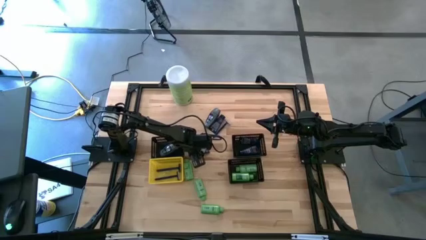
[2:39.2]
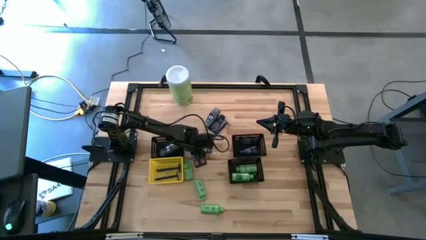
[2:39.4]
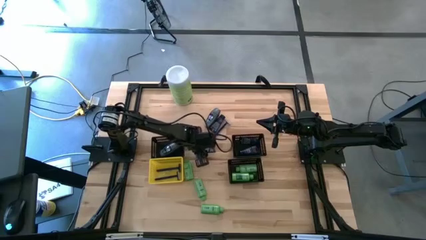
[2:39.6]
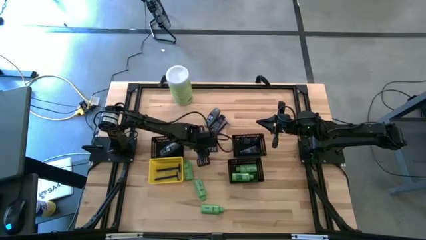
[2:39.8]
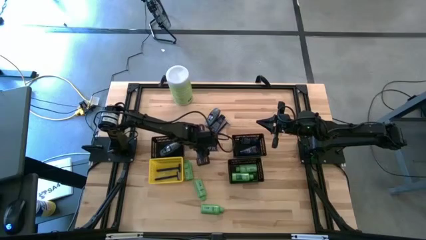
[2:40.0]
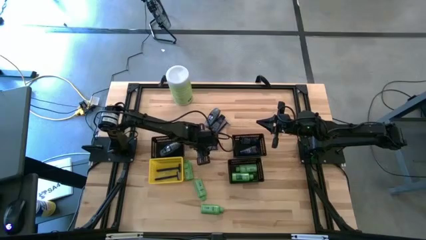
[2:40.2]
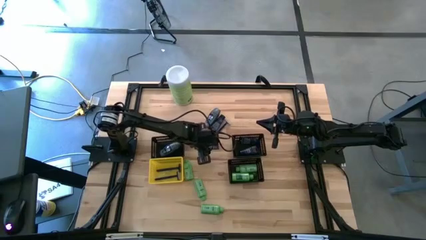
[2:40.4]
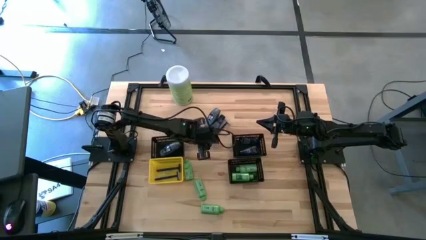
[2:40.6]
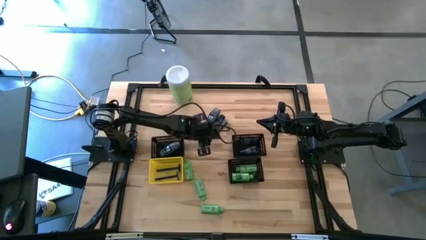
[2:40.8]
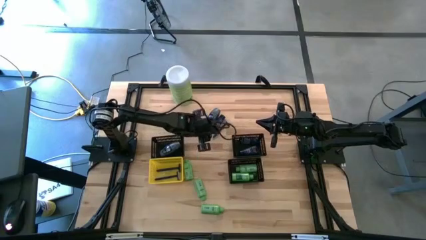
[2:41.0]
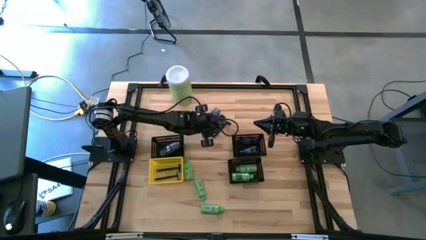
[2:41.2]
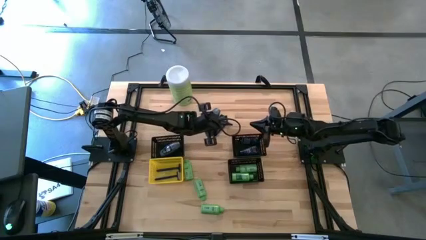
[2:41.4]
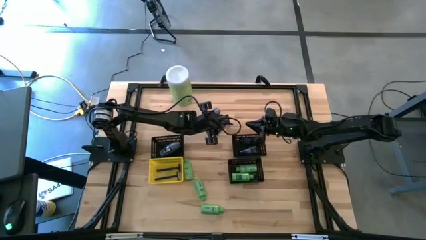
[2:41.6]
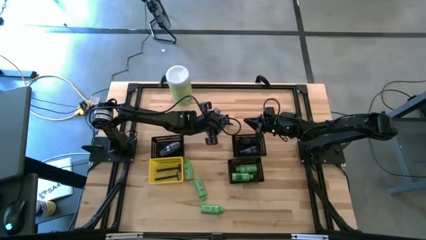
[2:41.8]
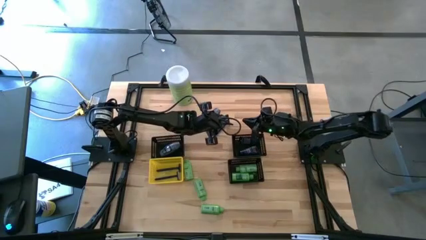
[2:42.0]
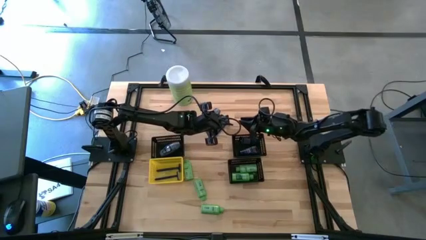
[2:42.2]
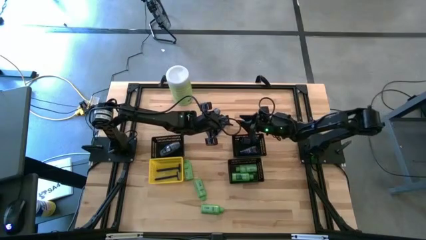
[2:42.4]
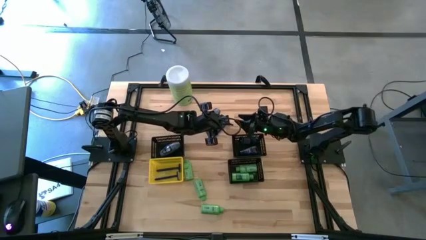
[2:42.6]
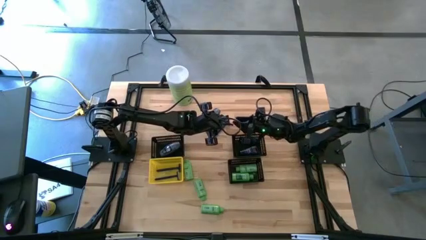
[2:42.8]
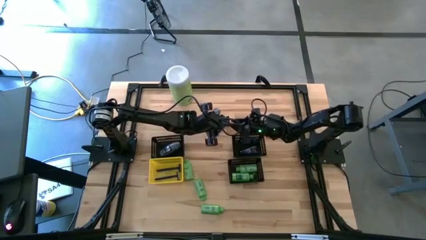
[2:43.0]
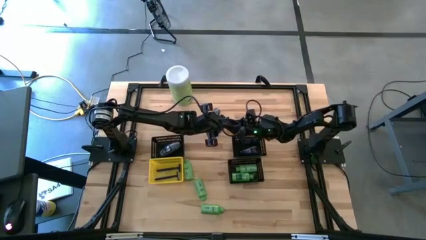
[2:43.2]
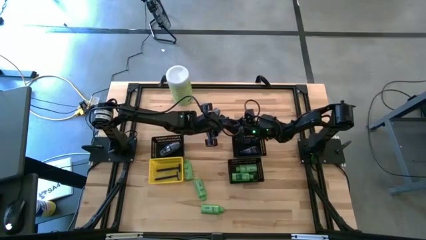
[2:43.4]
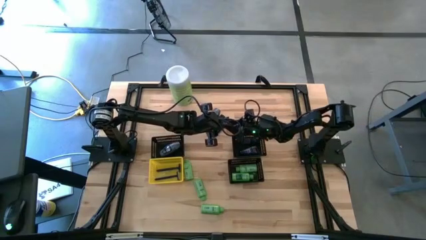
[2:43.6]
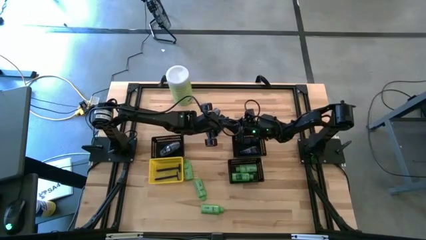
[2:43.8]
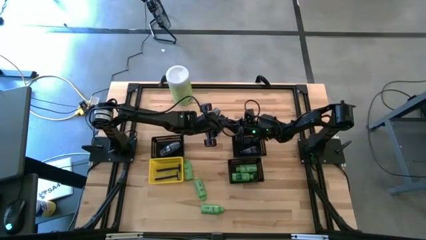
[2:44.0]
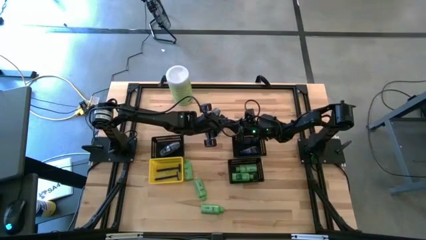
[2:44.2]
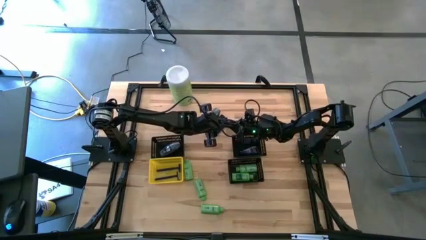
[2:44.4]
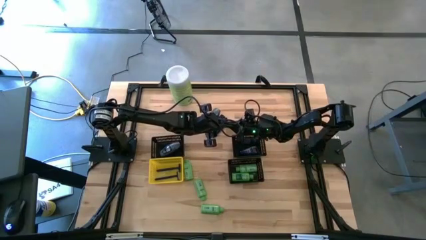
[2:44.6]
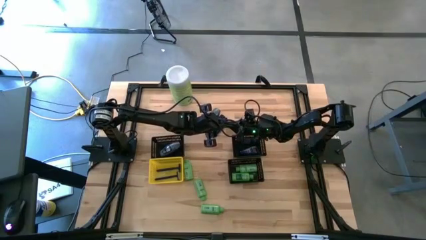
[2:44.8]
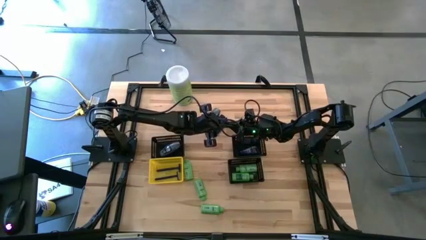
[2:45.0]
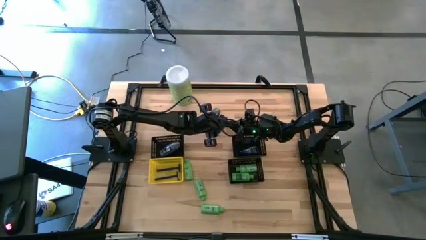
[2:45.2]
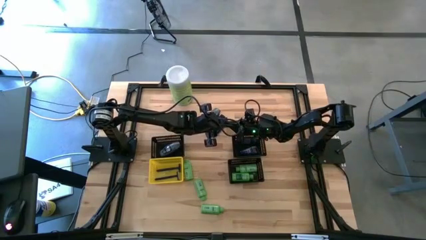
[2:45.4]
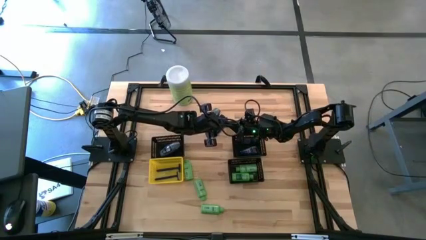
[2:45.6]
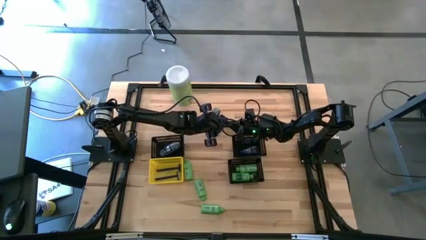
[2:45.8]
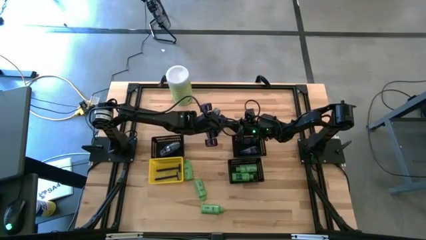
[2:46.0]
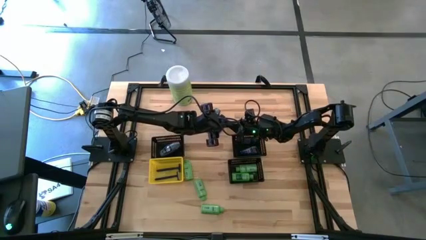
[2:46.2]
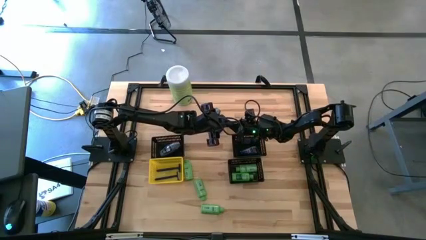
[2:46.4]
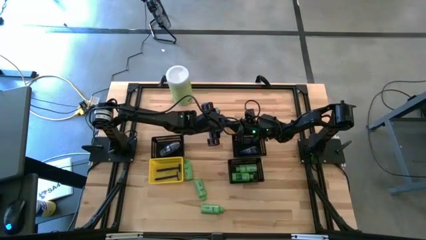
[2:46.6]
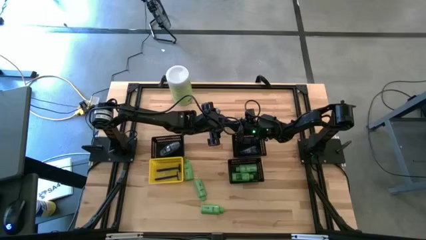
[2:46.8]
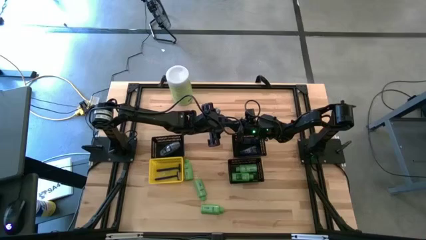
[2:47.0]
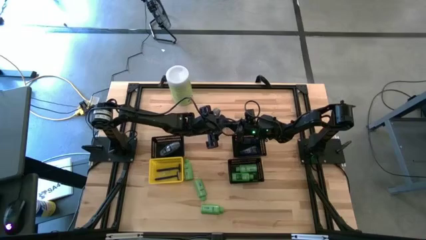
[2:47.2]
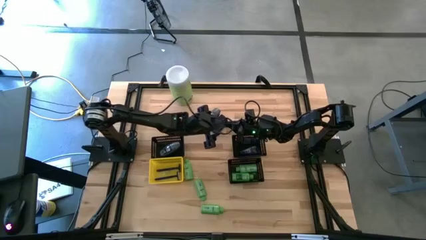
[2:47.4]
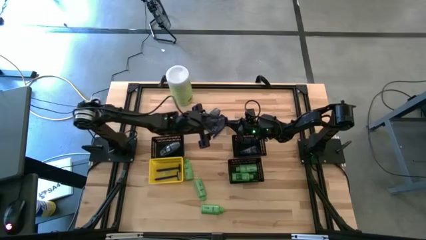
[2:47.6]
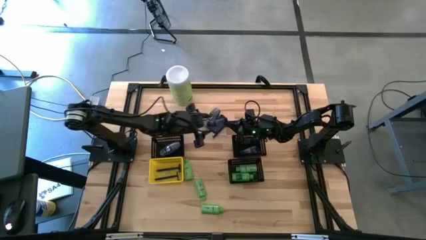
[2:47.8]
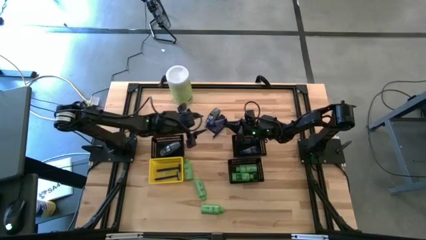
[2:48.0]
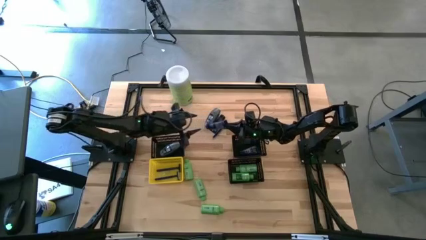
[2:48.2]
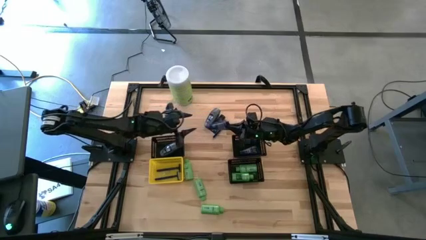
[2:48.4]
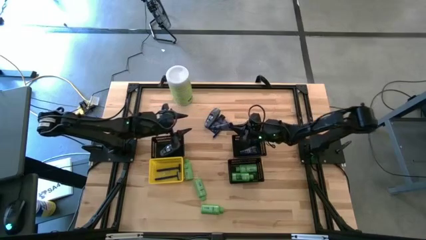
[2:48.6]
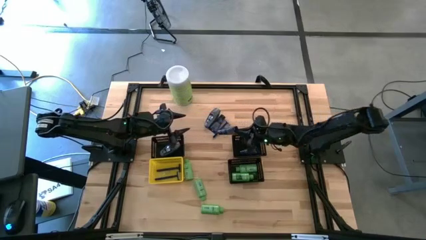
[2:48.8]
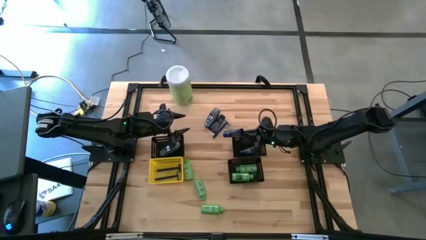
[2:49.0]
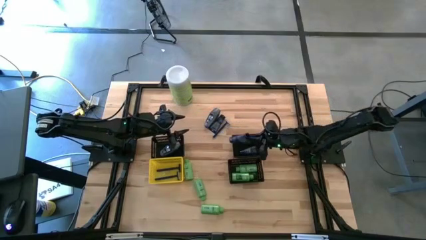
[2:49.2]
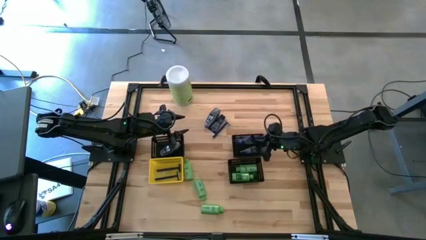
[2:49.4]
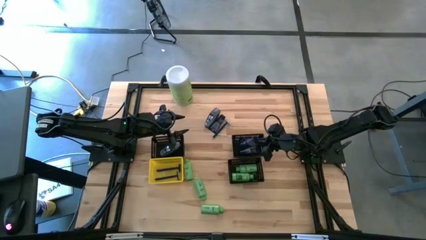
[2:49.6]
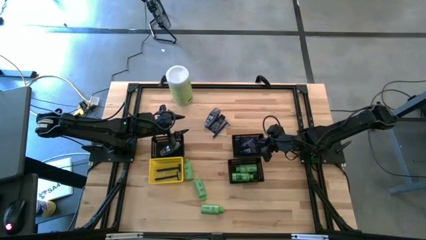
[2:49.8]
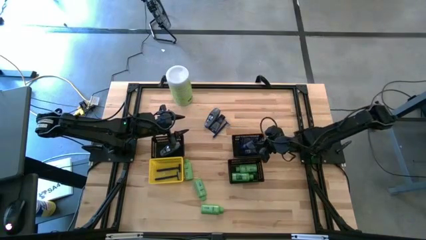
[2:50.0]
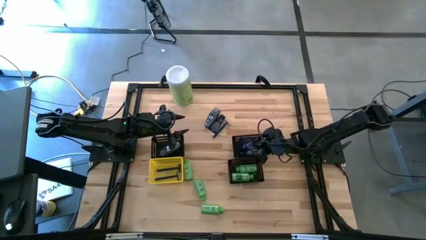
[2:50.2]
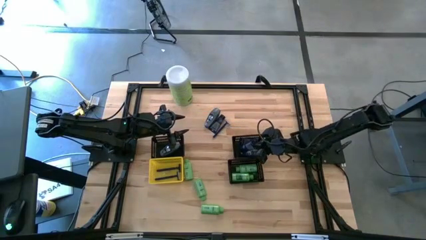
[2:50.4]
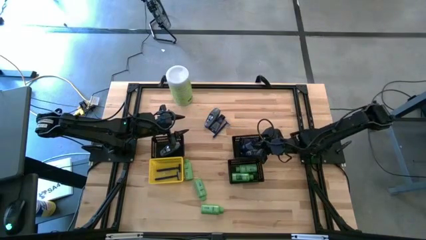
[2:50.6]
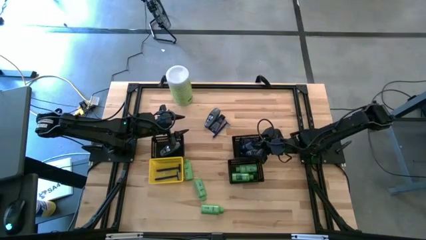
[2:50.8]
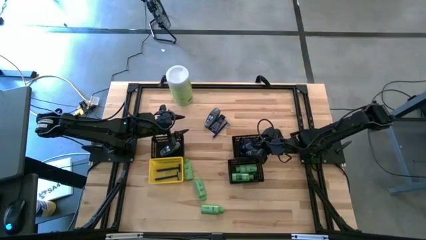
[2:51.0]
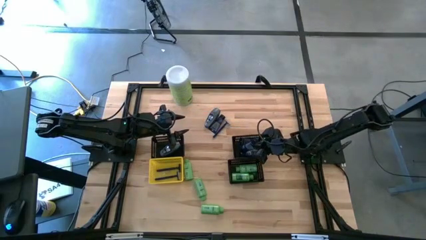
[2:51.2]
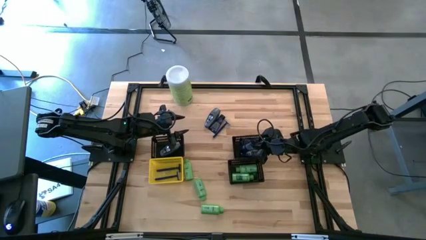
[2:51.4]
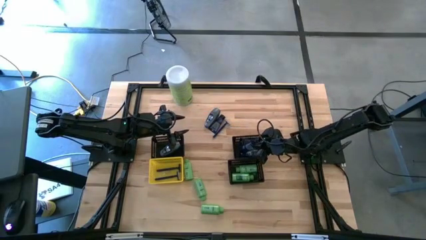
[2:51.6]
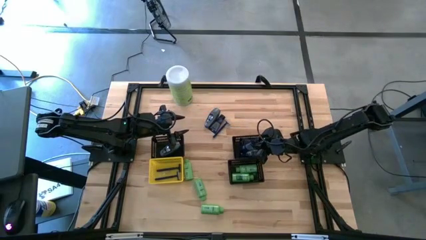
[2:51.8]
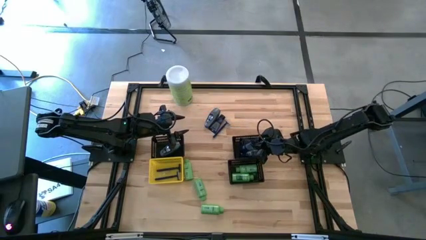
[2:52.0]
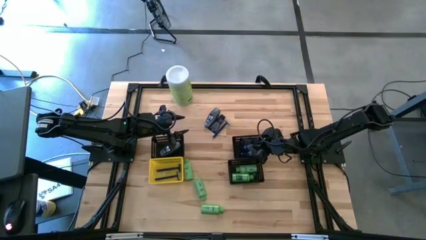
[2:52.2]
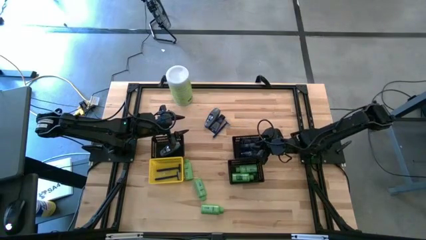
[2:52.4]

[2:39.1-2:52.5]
Task: Pick & Place Travel size toiletries
Put the blue shave cream tub into the top right black bin
